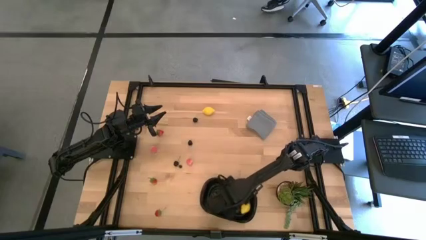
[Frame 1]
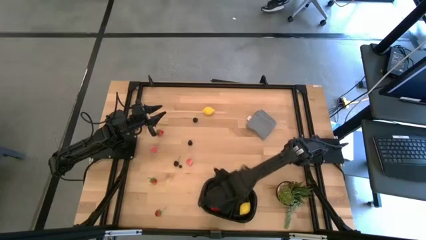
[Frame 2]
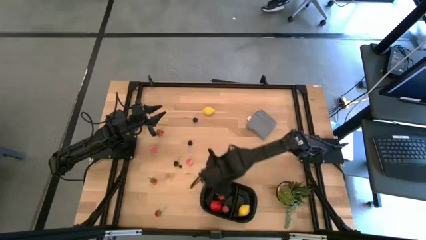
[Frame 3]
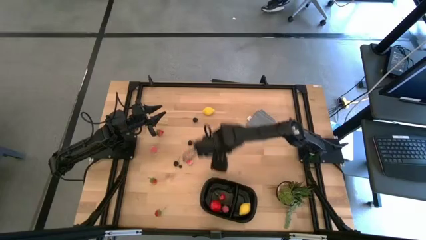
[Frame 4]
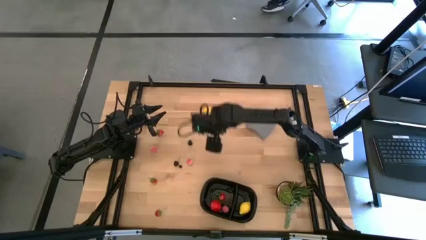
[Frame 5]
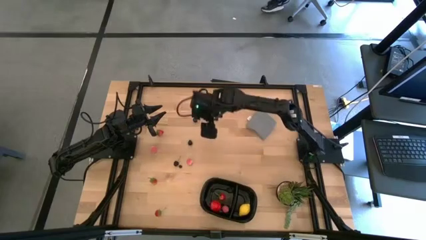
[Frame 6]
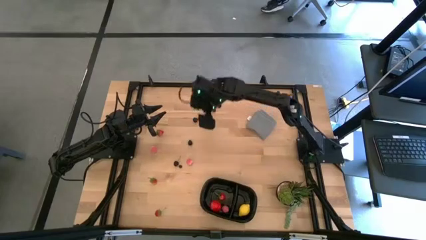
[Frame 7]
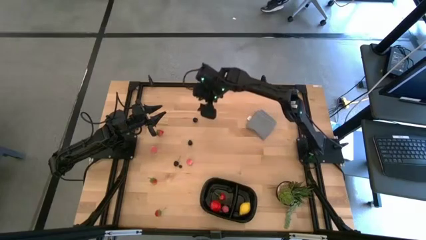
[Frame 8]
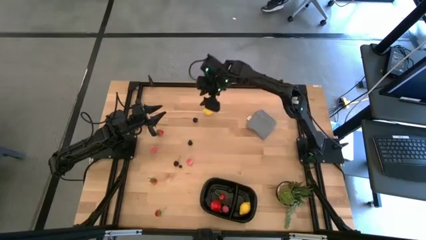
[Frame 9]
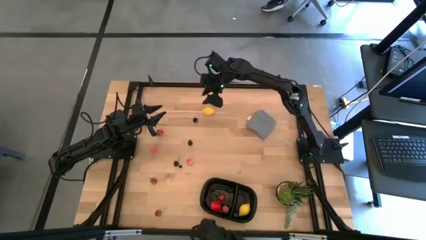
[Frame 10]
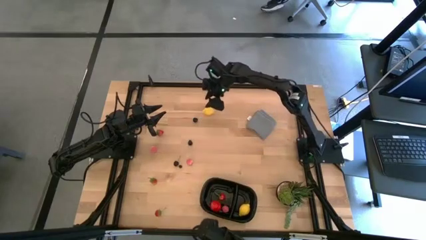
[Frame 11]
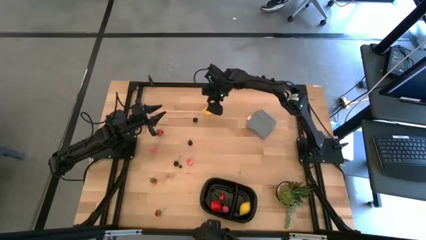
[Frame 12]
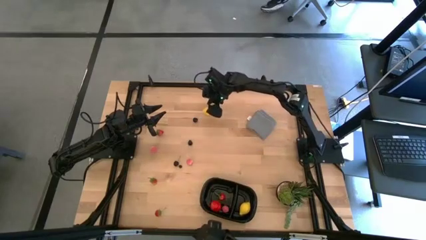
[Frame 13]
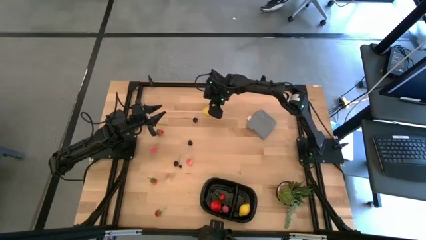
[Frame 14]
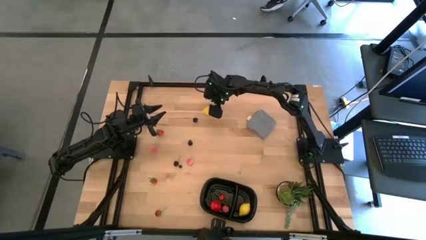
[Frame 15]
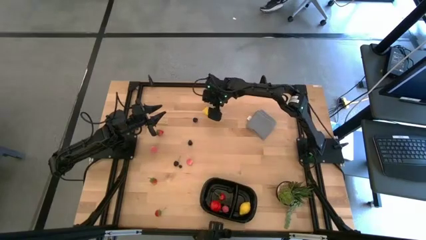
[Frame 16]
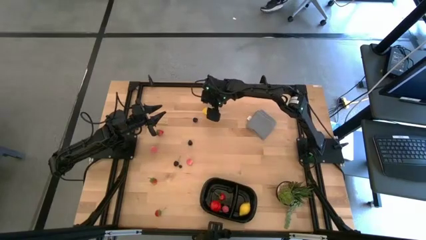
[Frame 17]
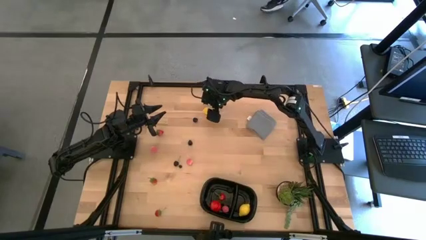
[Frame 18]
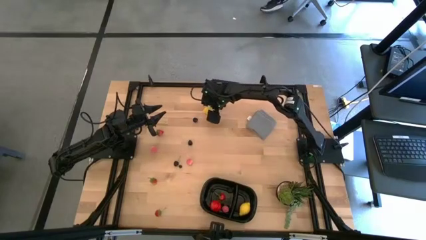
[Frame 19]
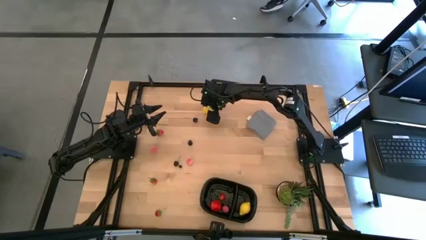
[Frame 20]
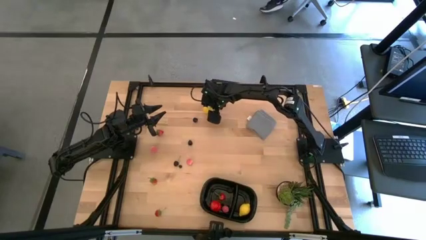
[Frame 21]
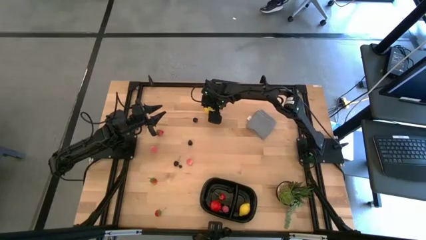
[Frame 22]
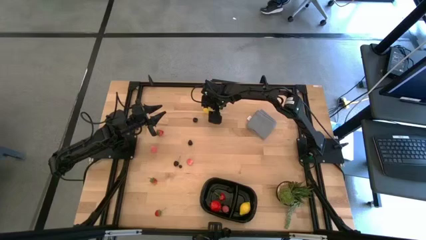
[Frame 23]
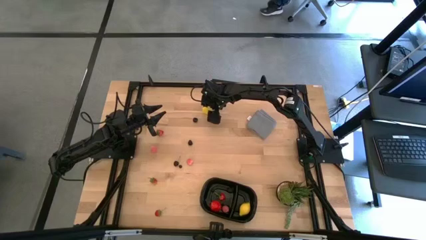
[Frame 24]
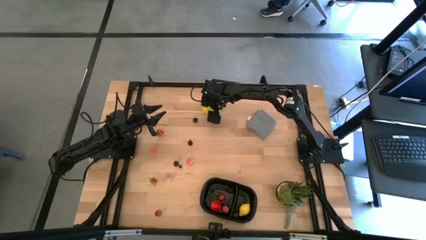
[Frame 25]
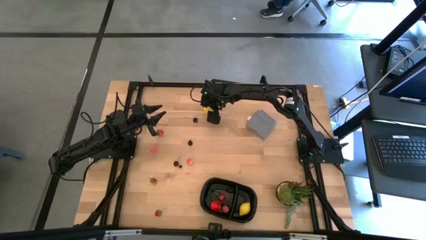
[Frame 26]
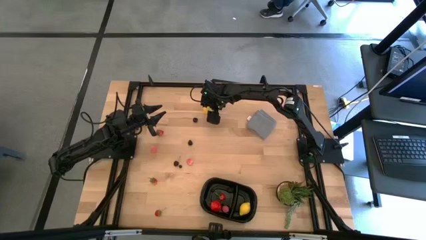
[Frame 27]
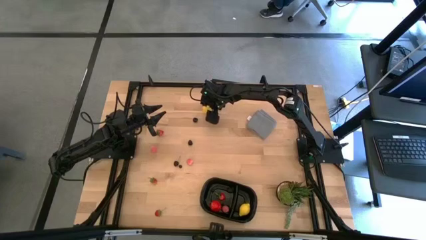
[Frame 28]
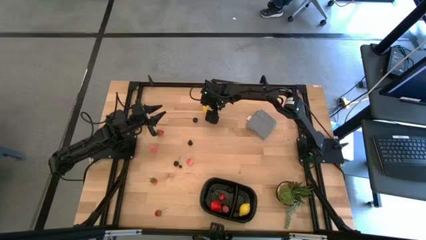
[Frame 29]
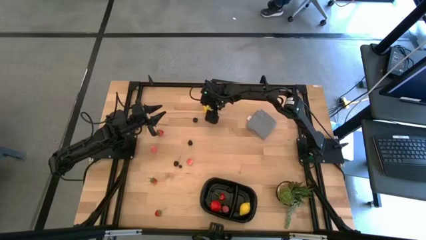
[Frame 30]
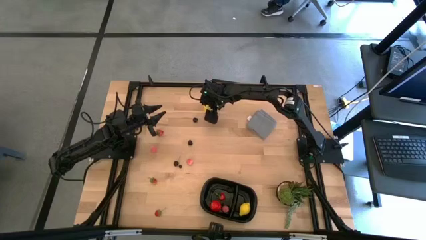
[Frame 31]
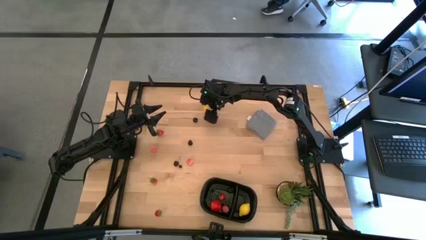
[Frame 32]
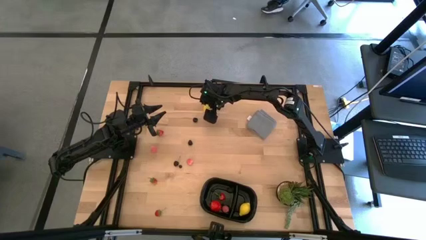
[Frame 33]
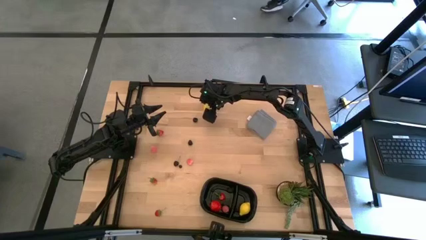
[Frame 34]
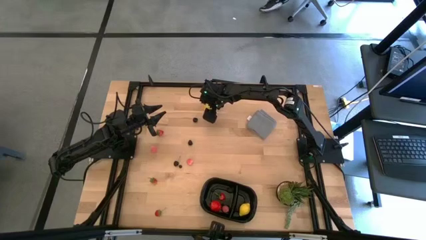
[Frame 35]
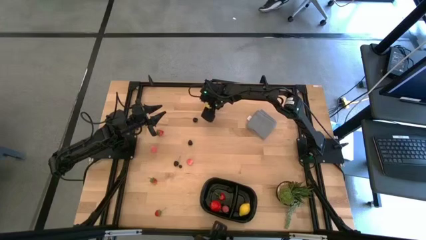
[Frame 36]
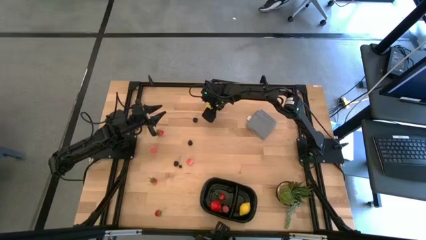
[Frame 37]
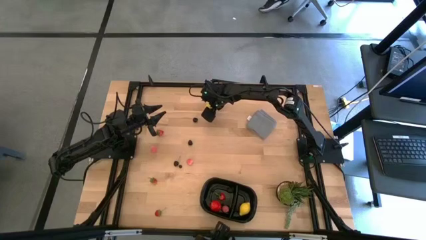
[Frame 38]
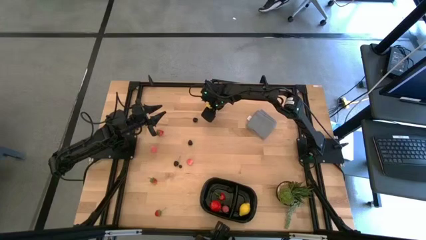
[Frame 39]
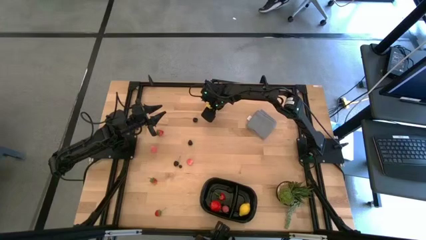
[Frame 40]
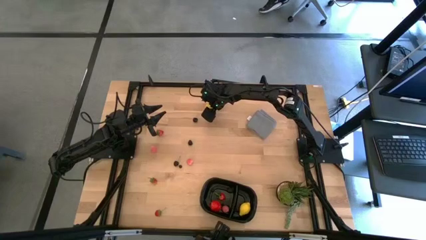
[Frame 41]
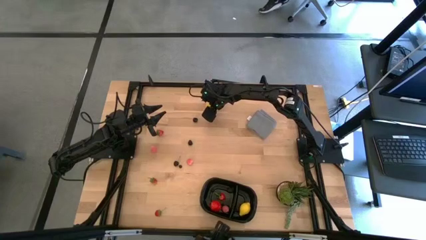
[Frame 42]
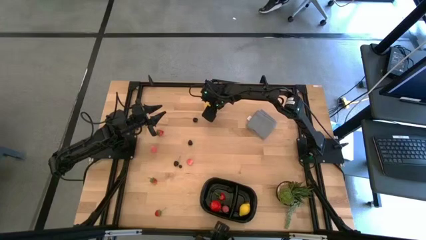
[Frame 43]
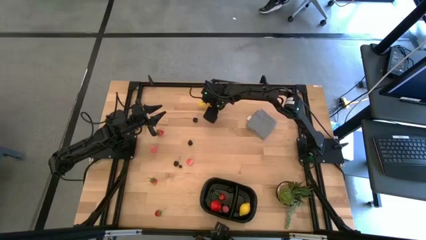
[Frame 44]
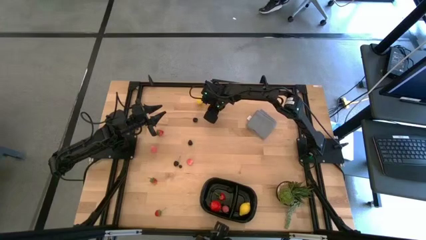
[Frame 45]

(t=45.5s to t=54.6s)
Task: Pick and placing Produce into tupperware
Put the lemon into the black bin

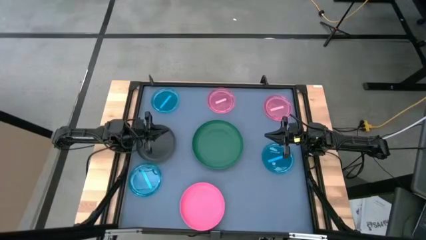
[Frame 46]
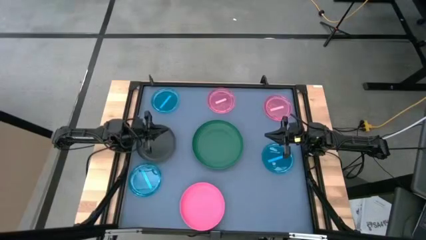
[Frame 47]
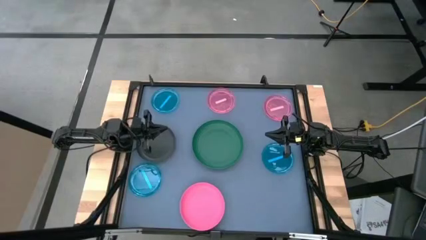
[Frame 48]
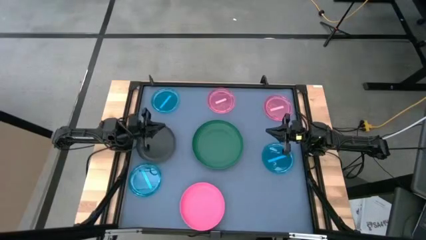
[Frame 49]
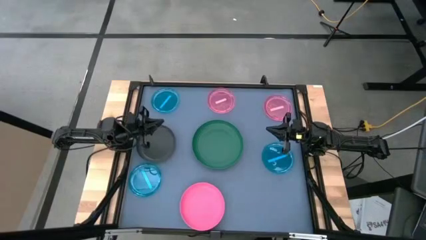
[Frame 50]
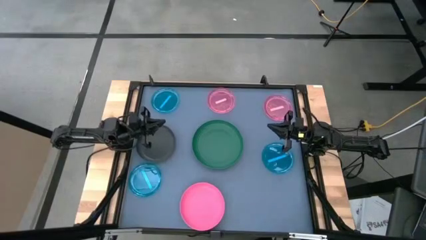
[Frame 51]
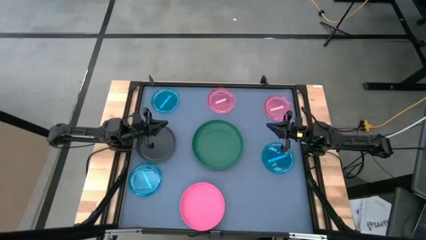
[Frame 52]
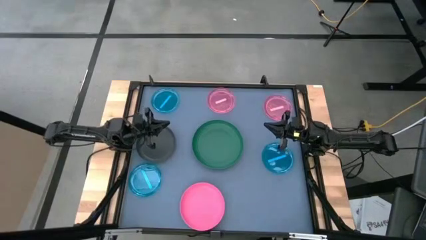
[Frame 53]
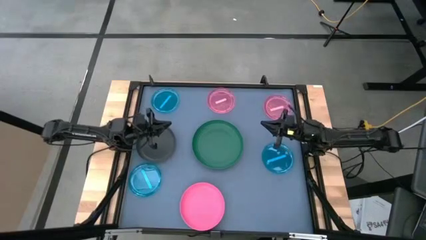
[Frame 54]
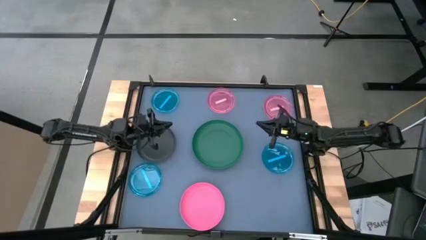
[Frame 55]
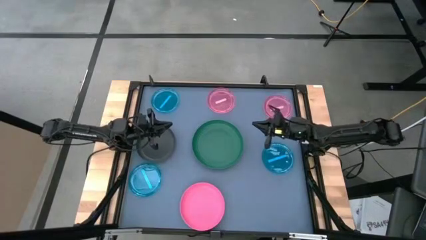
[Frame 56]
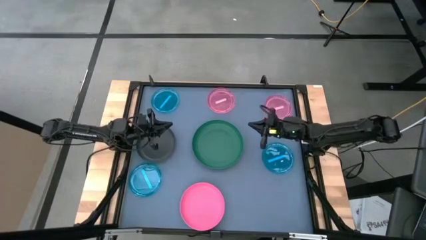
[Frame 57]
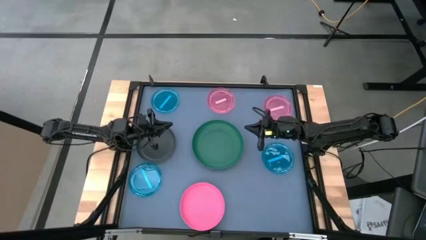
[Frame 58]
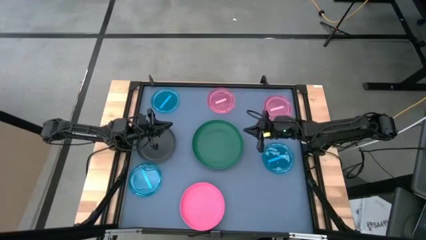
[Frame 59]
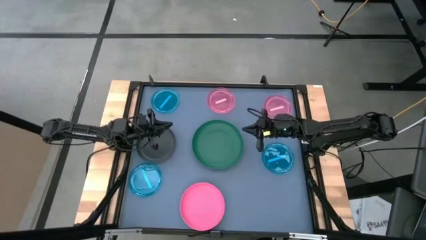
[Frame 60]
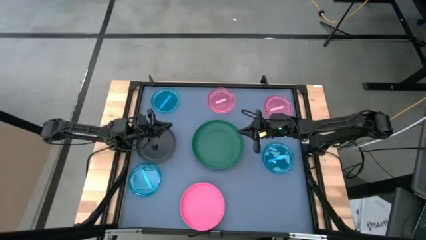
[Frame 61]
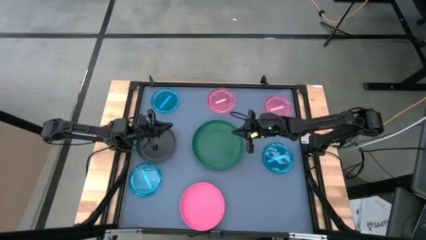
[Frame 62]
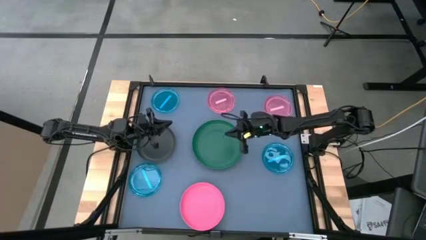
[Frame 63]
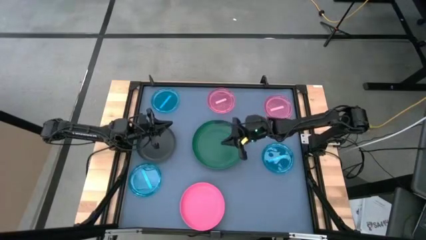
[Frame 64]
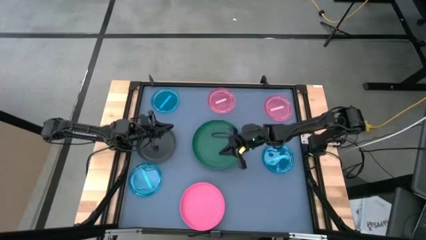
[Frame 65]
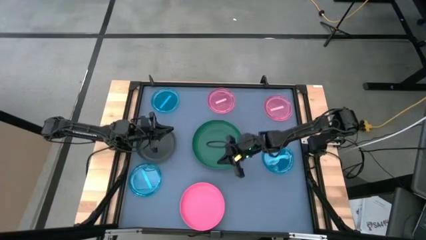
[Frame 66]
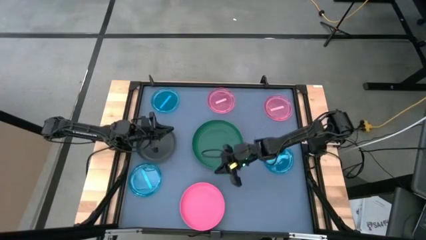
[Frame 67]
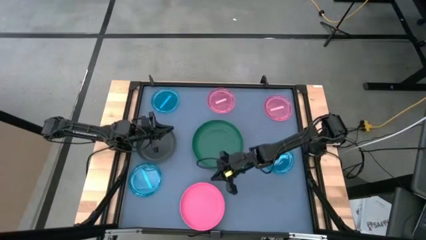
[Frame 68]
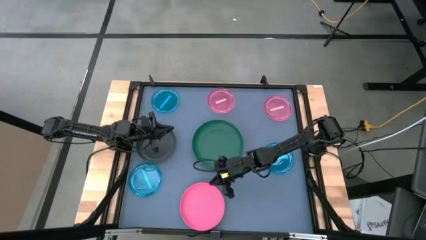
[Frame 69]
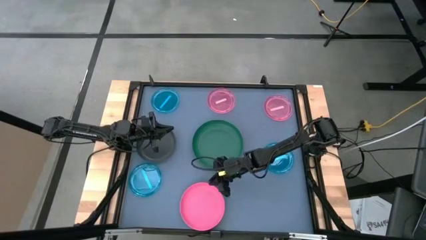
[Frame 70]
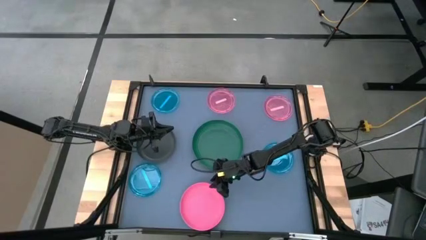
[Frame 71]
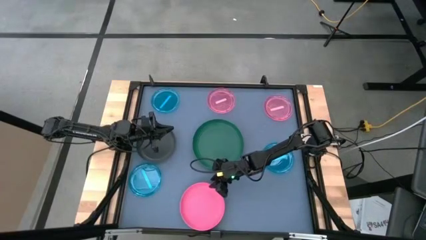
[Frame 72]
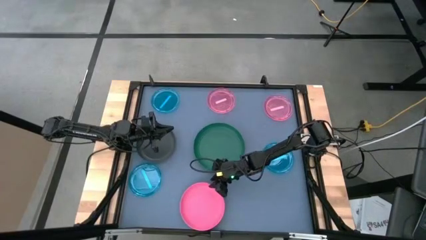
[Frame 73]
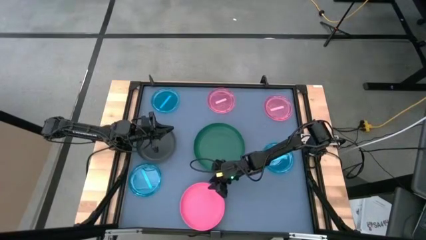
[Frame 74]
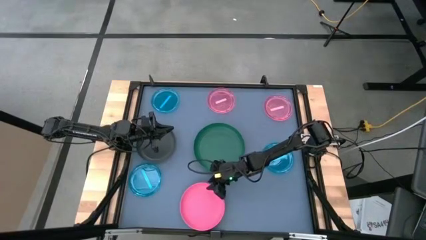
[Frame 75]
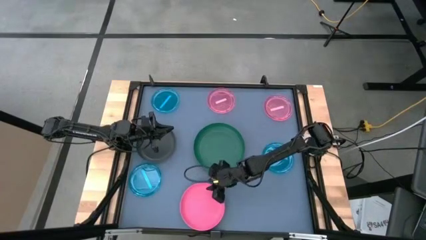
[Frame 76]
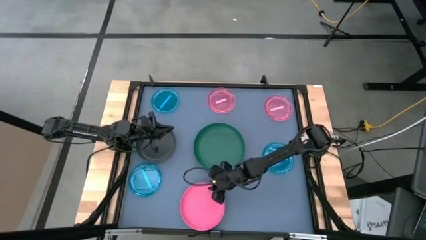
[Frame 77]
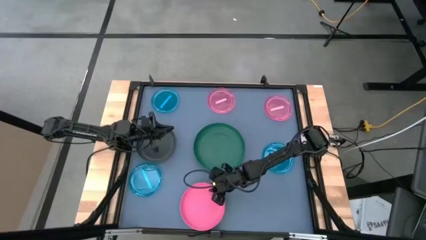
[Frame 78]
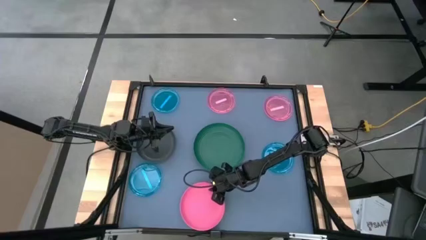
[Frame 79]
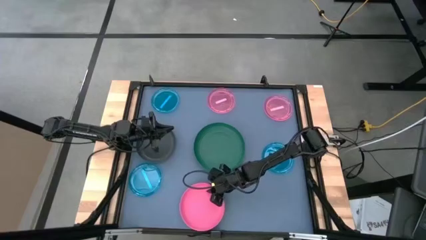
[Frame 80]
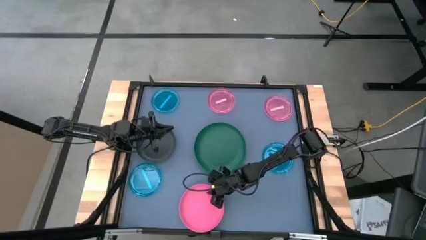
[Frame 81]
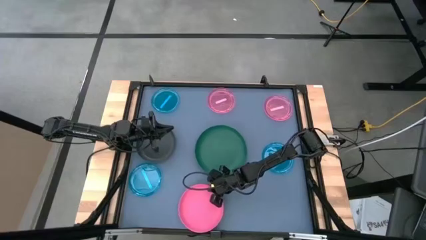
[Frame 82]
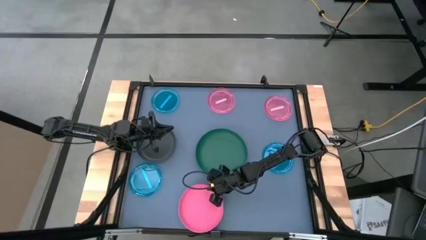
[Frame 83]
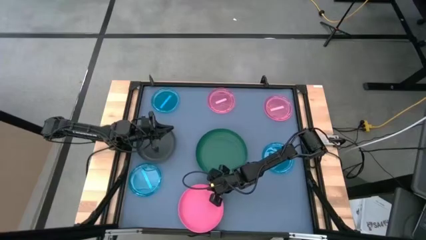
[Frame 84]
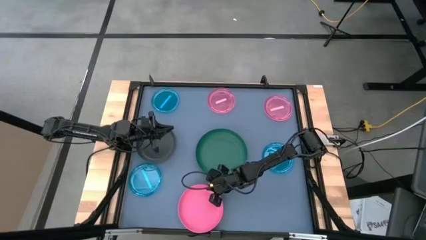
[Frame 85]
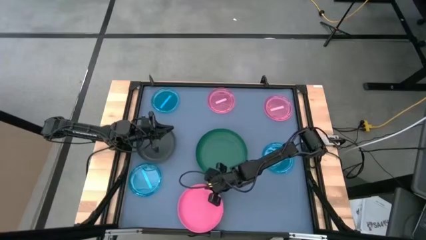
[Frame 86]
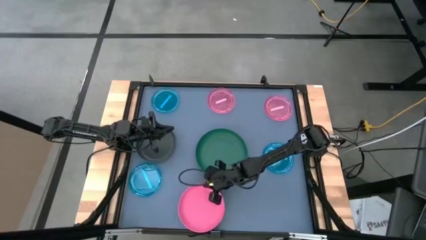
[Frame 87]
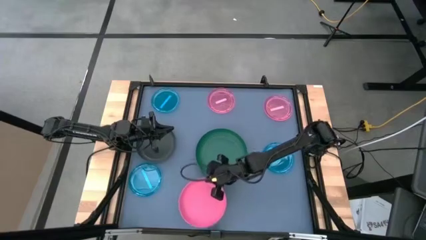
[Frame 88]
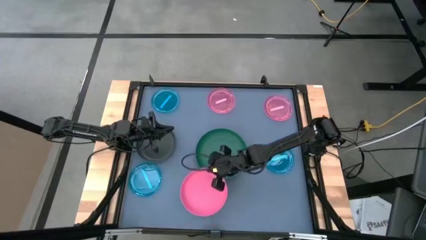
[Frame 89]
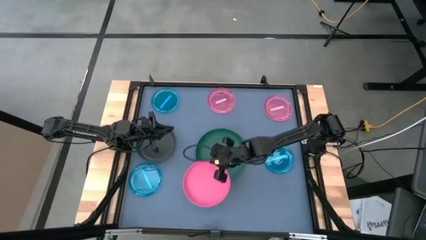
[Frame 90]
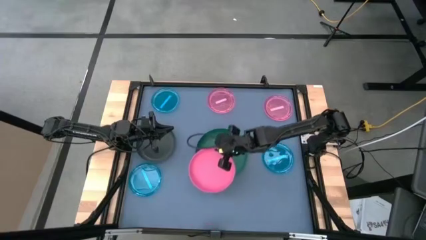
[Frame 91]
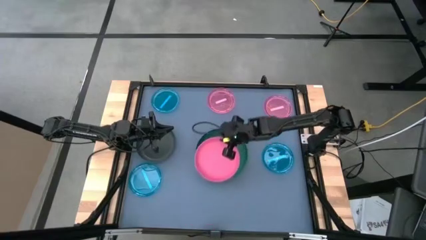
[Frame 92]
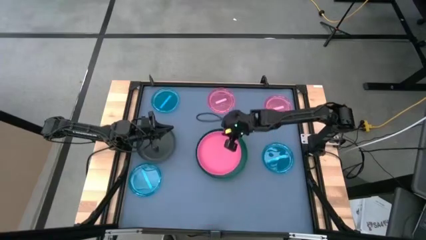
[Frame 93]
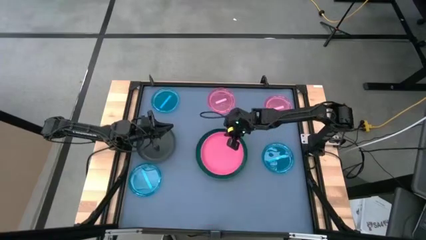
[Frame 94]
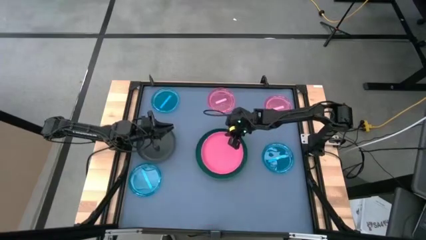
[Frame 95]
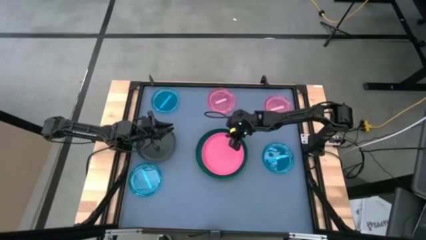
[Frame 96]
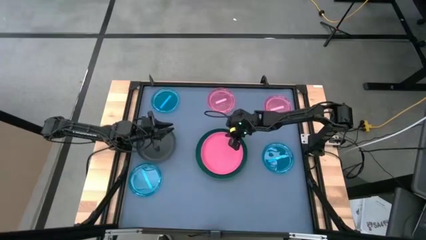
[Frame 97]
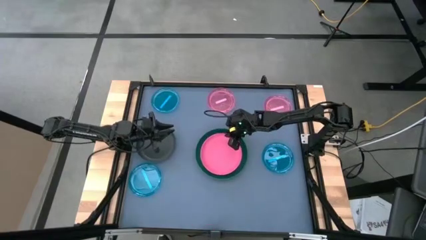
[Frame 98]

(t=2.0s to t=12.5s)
Task: Stack plastic plates
Stack the pink plate on top of the green plate
